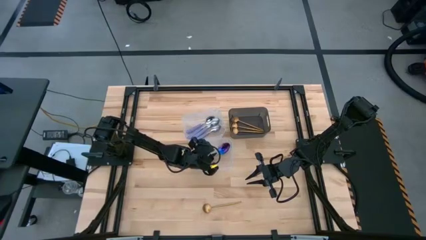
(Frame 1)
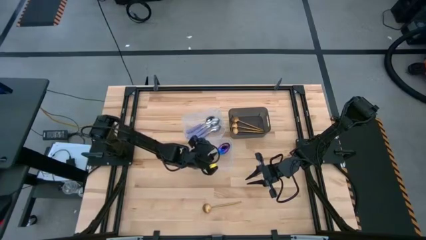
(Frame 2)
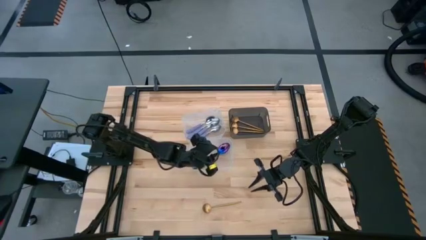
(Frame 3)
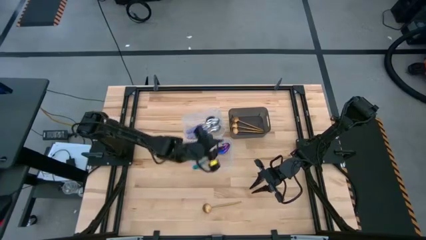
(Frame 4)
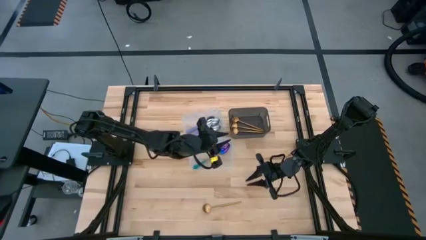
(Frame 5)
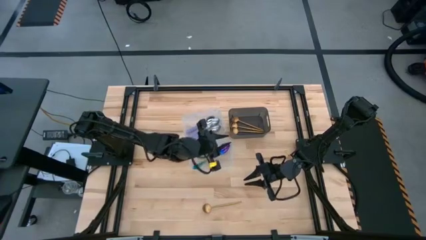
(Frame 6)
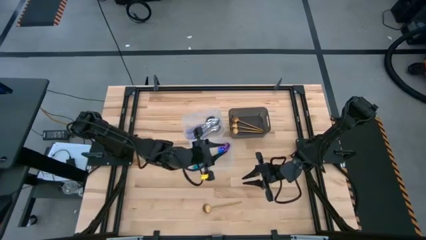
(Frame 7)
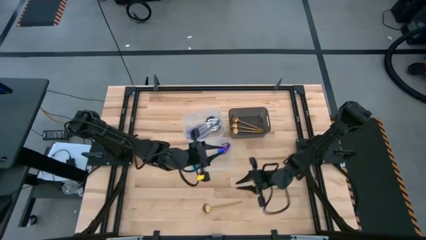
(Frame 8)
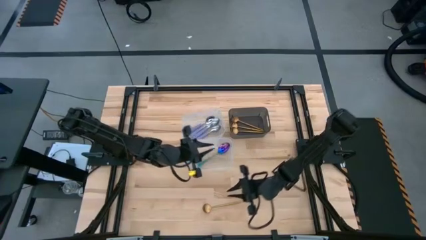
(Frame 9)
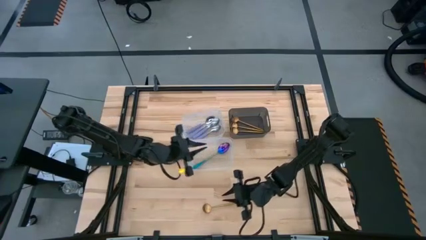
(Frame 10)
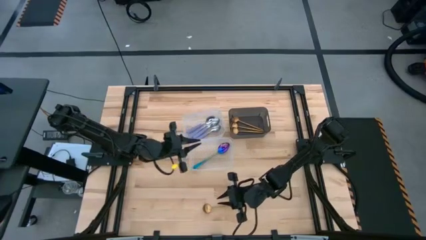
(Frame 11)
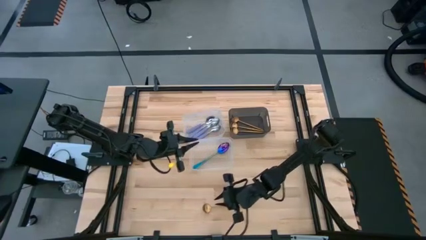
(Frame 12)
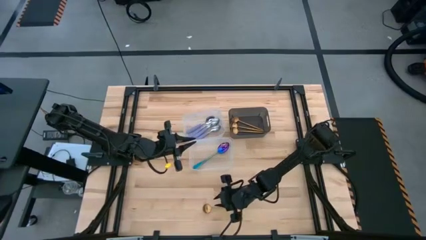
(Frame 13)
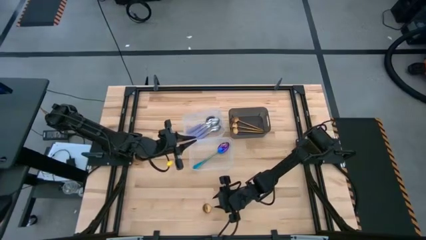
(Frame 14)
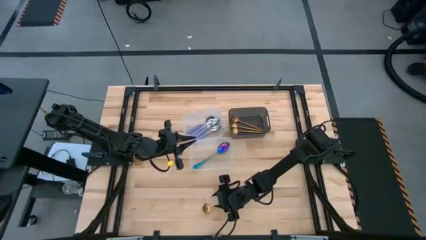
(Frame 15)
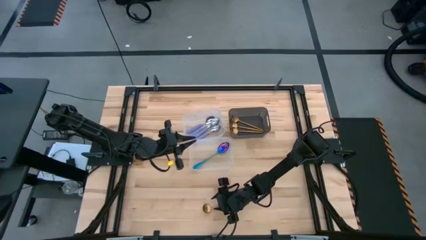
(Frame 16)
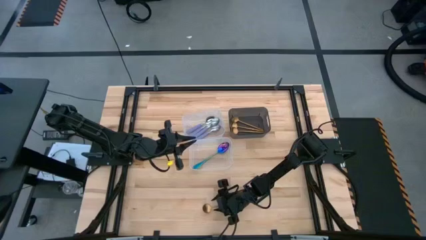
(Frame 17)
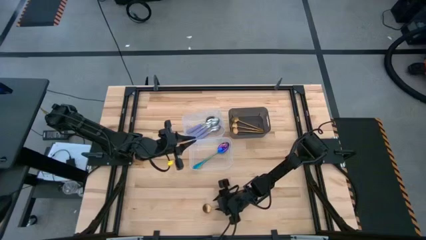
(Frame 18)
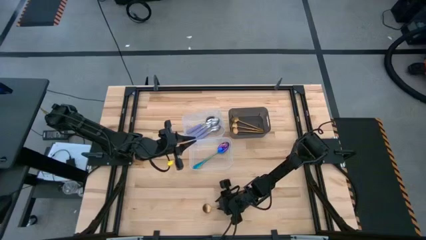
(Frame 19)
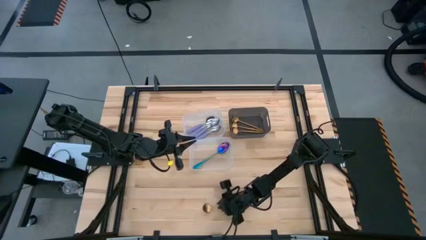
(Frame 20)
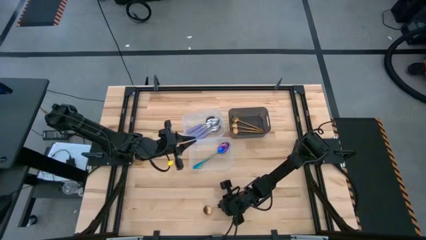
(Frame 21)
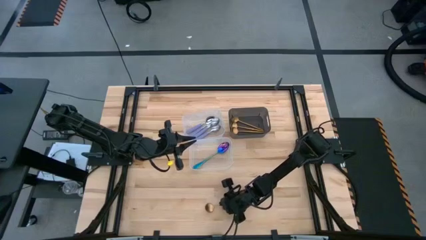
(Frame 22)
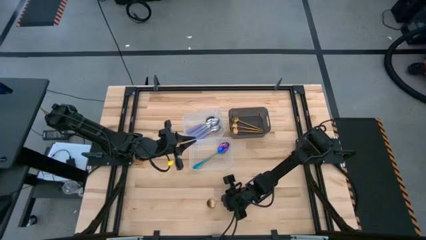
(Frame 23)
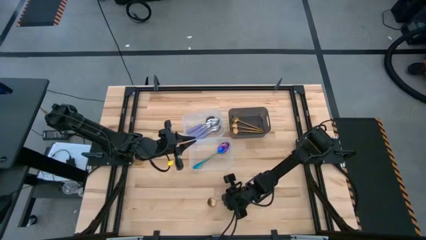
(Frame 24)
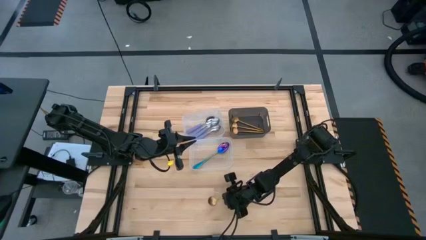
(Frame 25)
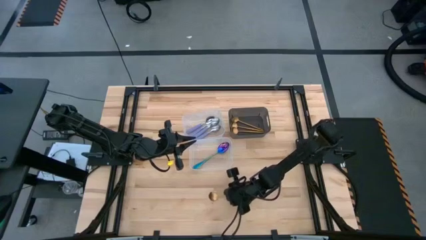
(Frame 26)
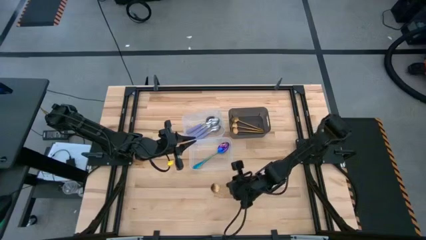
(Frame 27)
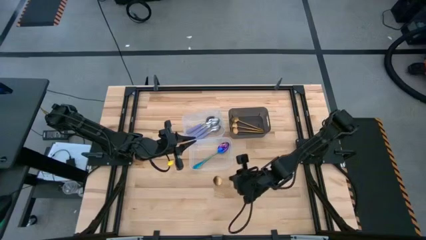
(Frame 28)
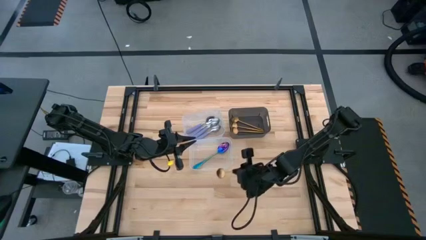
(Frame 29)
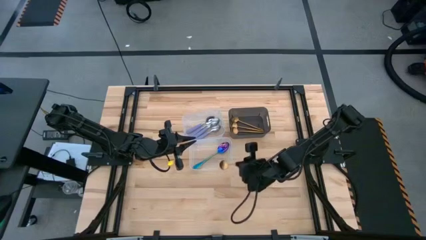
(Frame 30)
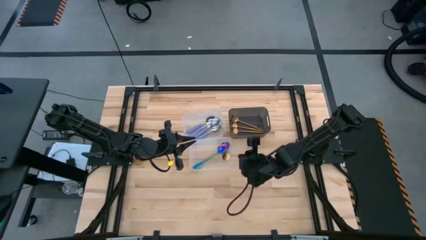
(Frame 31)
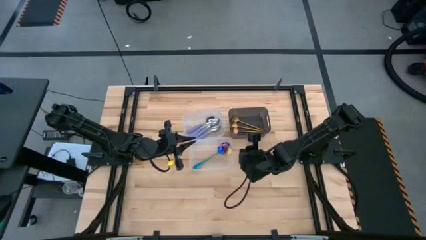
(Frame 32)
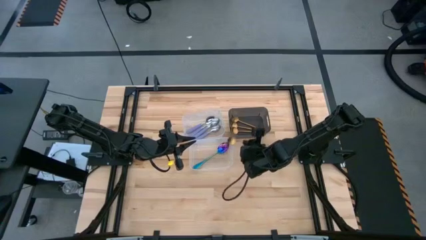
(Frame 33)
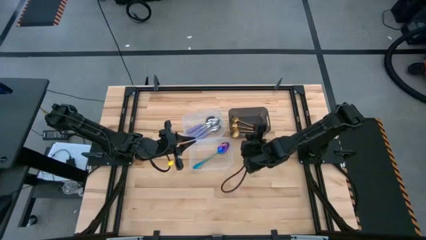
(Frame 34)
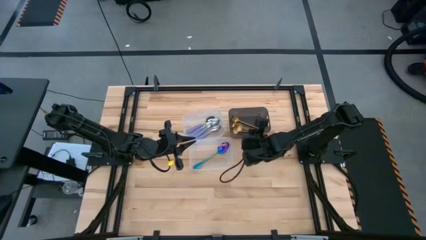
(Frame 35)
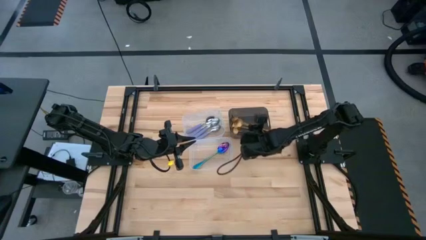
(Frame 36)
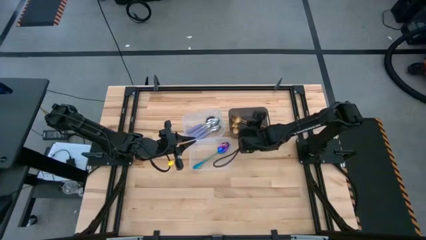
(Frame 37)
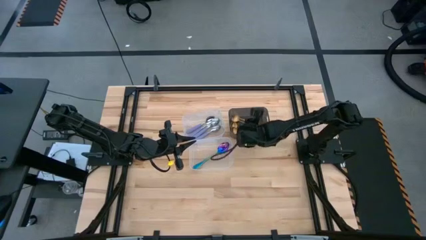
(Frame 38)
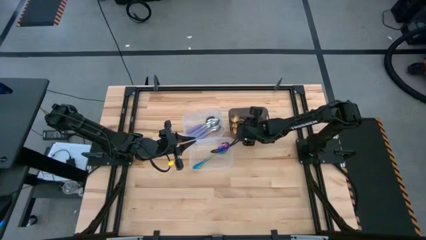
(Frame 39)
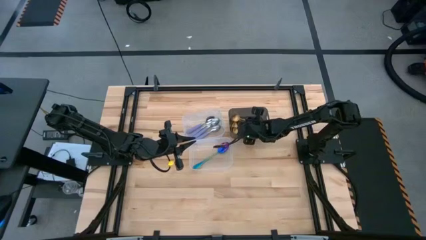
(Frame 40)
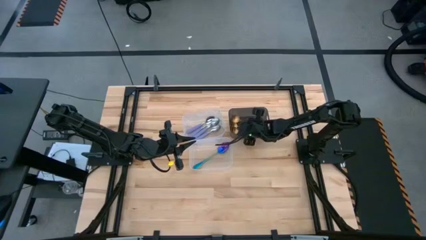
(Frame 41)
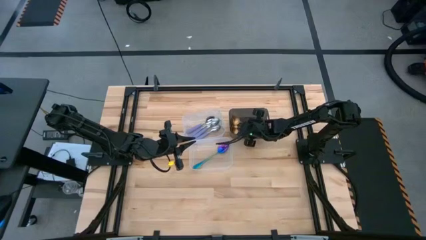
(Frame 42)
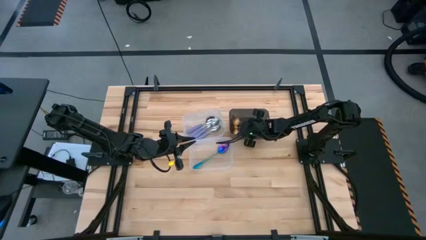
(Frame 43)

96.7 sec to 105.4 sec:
Task: Sort silverware by color (type)
Put the gold spoon into the black bin

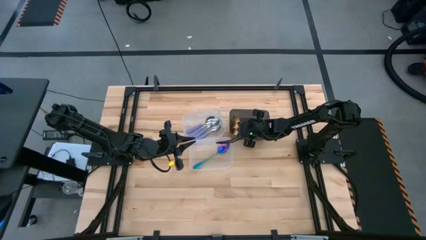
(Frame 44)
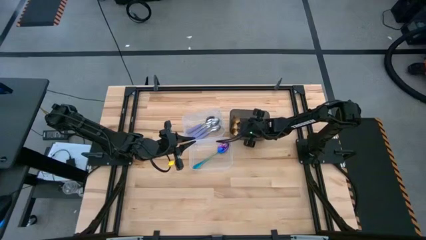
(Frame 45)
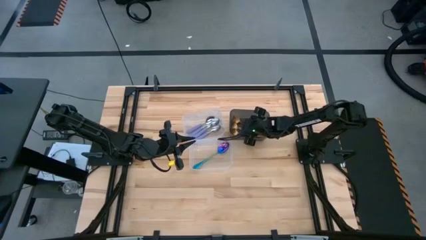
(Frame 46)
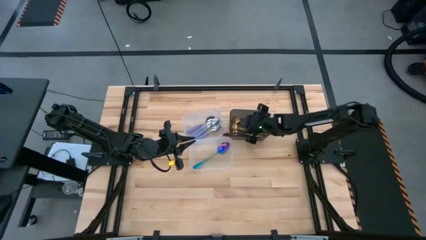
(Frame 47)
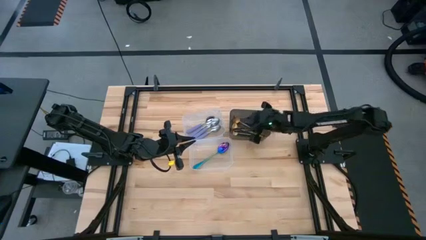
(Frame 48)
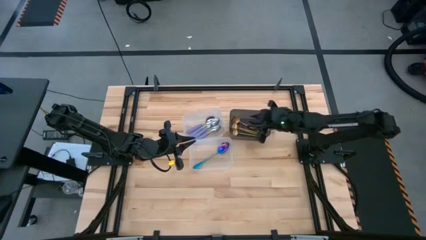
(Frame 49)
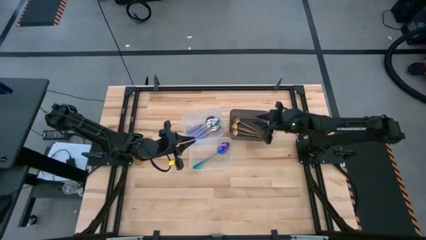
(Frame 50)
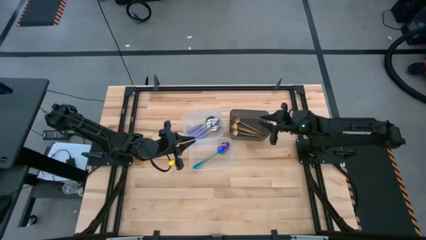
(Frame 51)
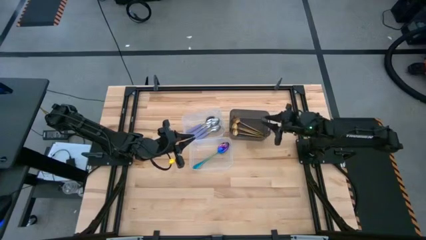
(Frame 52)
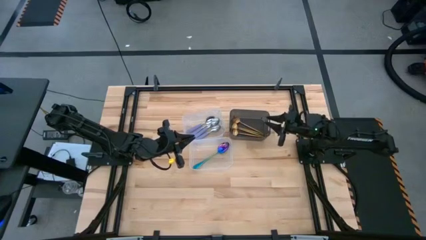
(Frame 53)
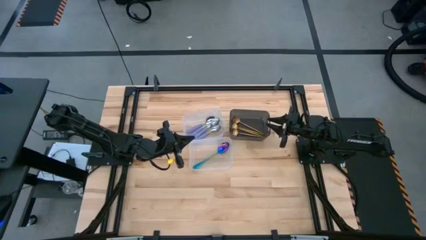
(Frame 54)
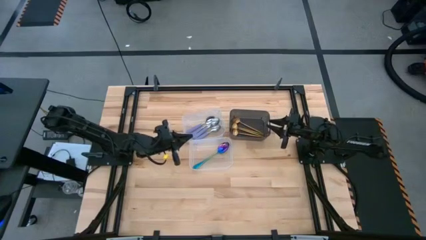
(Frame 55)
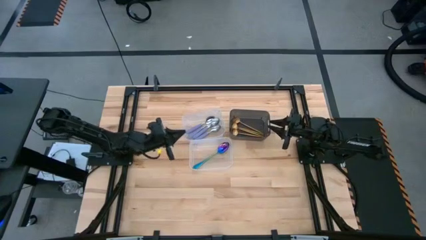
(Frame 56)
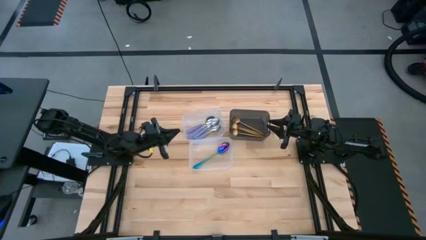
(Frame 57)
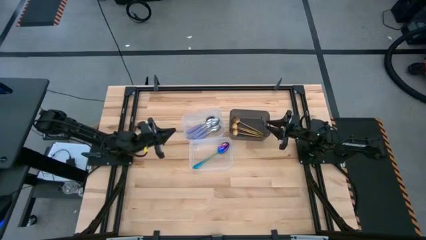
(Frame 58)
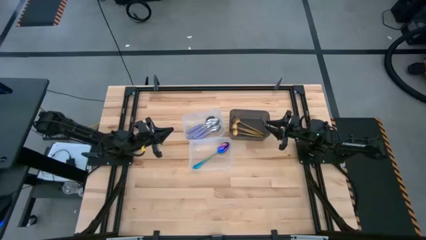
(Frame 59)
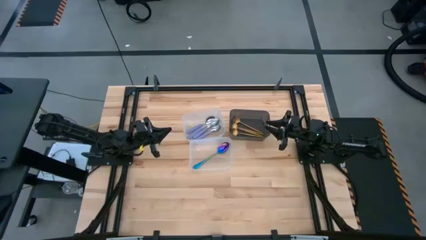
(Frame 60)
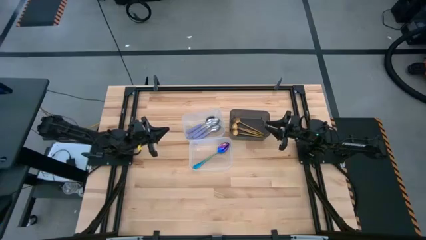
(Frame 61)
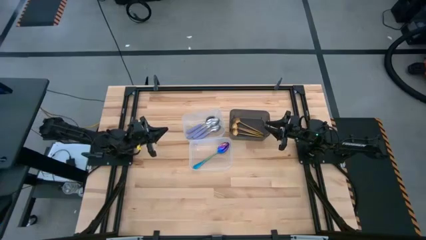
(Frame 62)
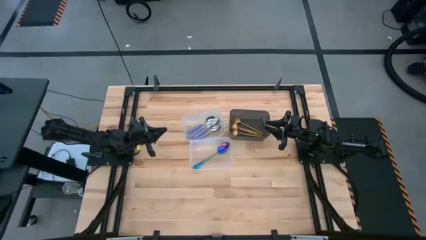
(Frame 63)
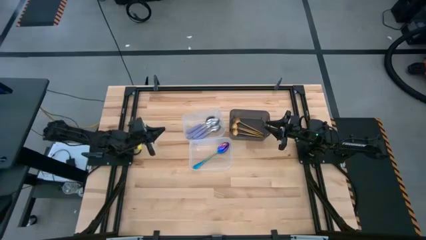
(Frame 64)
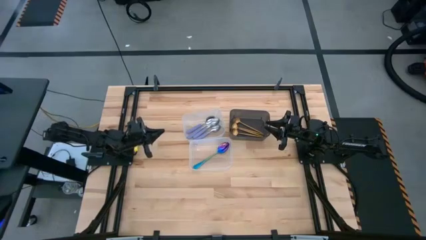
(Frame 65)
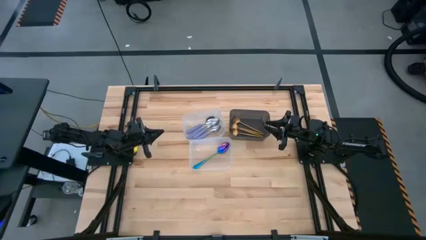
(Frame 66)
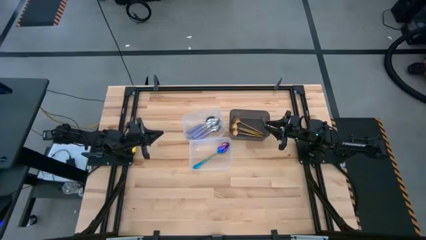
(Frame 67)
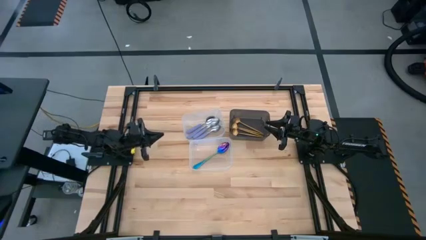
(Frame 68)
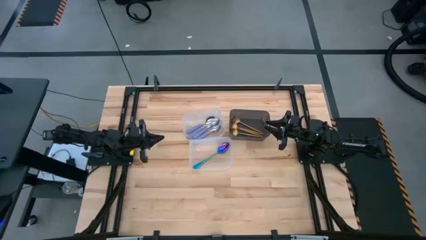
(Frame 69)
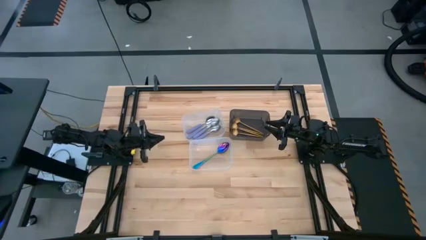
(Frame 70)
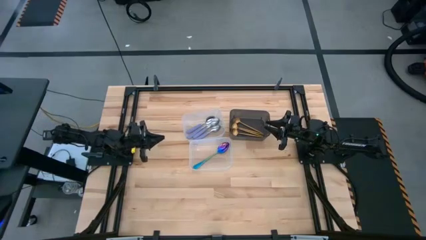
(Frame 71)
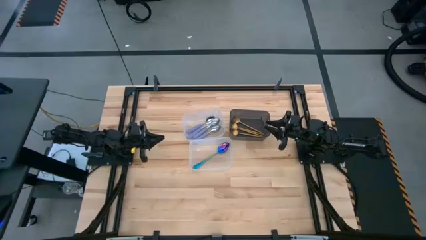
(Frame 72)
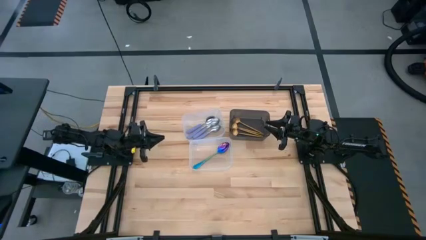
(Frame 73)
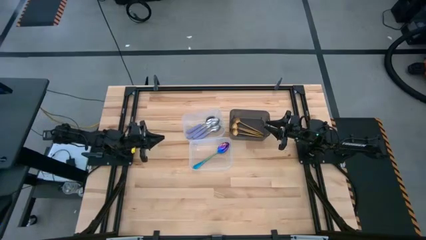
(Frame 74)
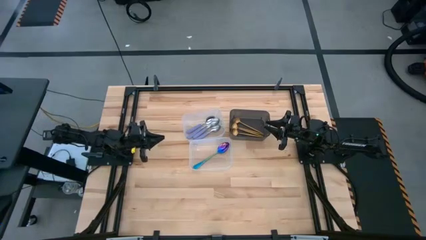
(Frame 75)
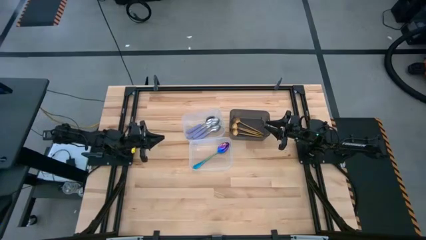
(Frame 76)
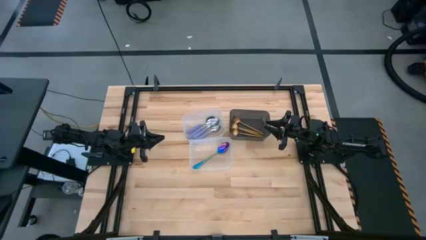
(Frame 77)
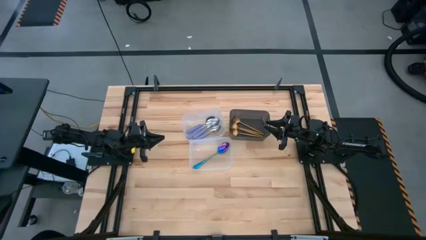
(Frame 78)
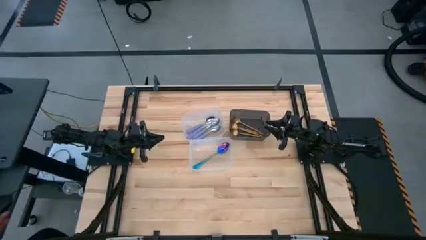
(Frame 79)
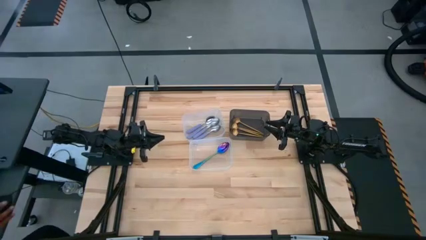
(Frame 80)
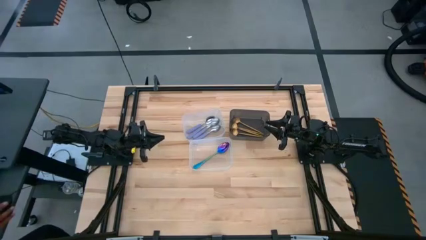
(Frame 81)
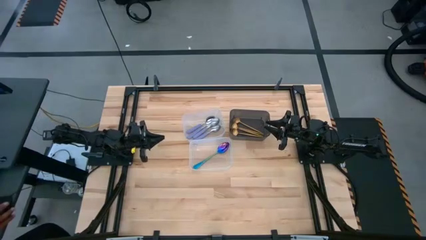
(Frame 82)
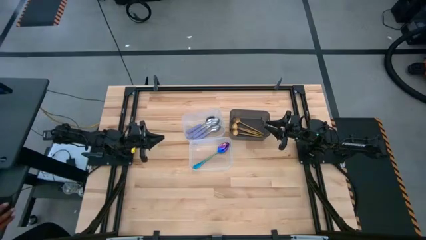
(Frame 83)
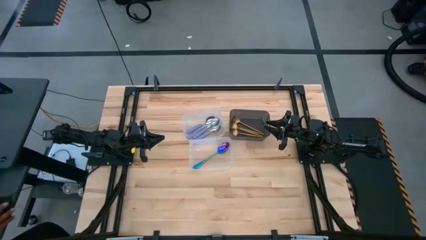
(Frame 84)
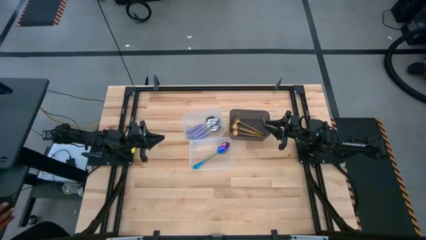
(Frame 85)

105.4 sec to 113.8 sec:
Return to Home Position
